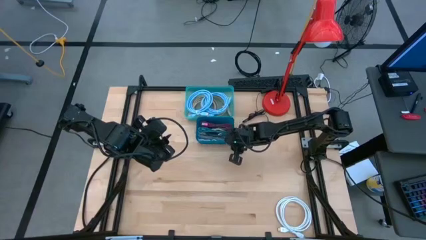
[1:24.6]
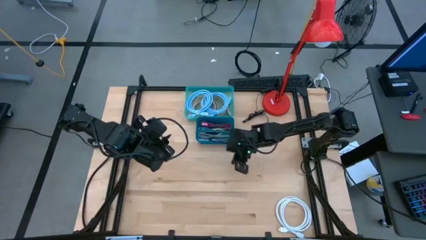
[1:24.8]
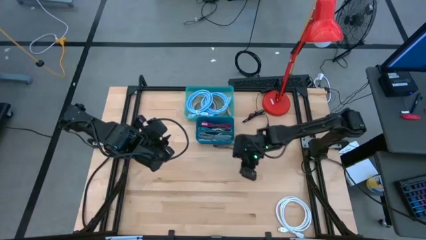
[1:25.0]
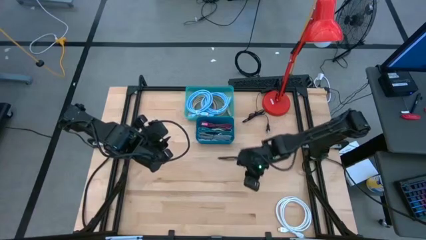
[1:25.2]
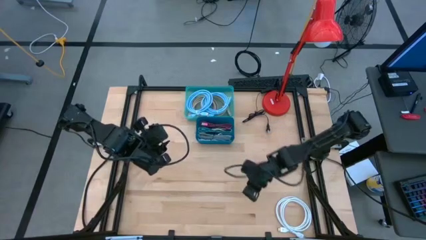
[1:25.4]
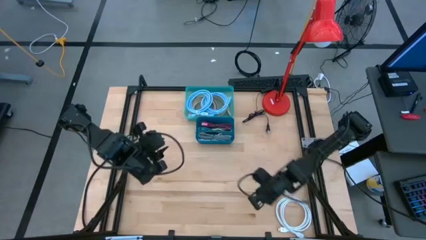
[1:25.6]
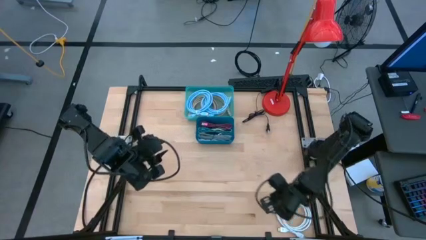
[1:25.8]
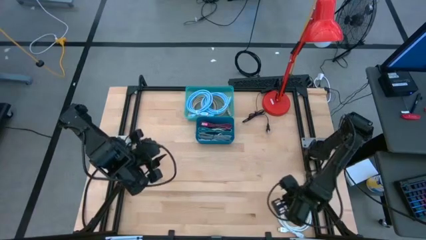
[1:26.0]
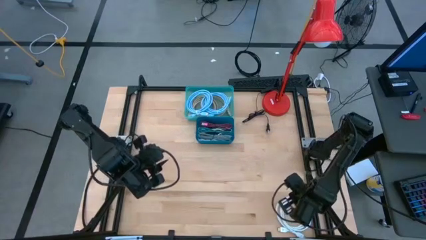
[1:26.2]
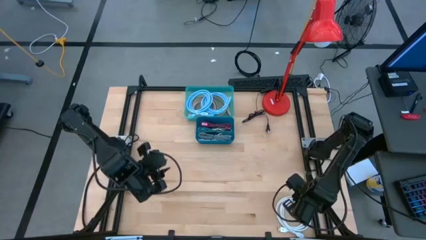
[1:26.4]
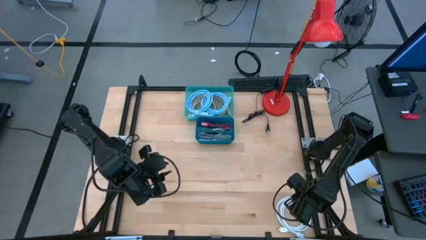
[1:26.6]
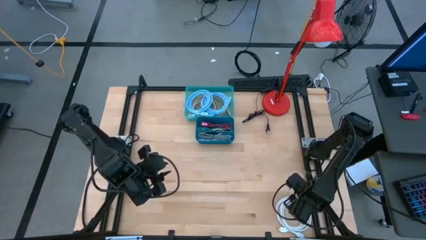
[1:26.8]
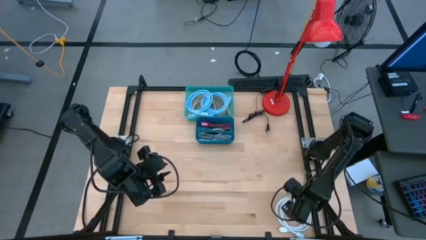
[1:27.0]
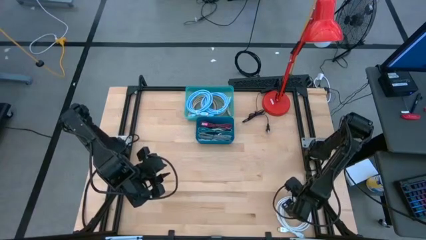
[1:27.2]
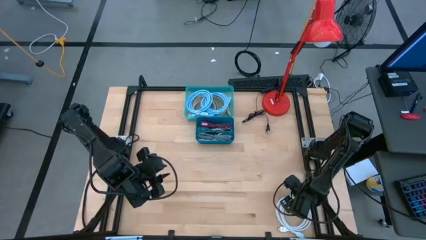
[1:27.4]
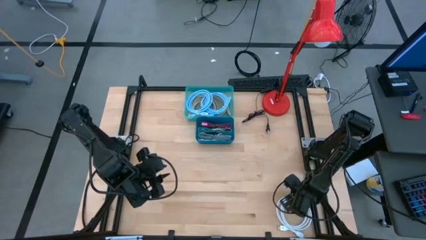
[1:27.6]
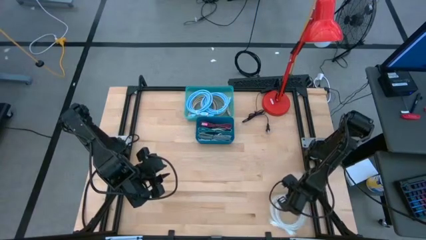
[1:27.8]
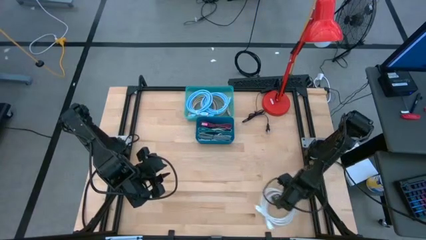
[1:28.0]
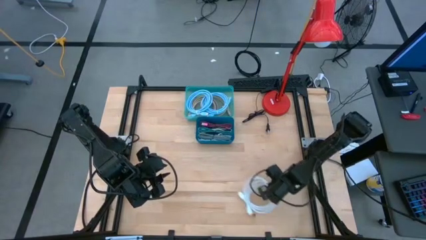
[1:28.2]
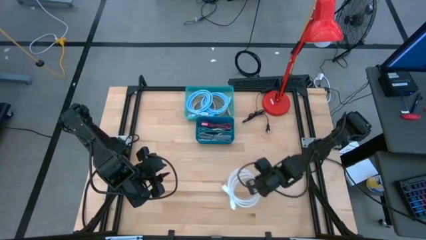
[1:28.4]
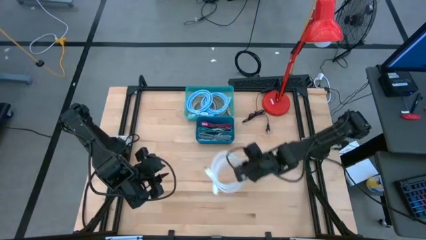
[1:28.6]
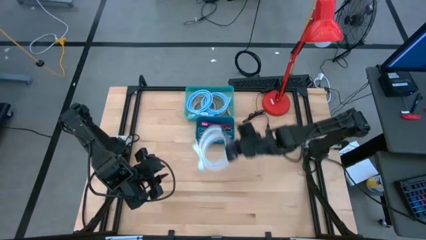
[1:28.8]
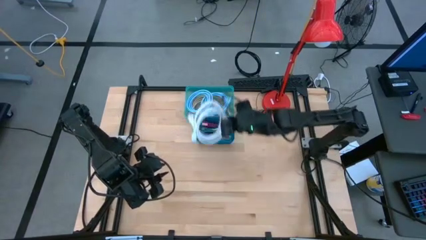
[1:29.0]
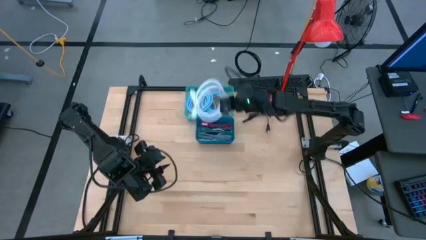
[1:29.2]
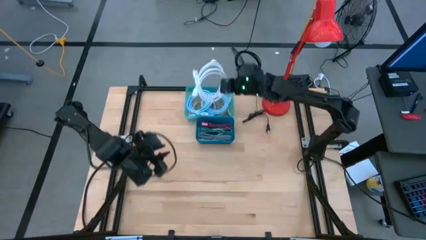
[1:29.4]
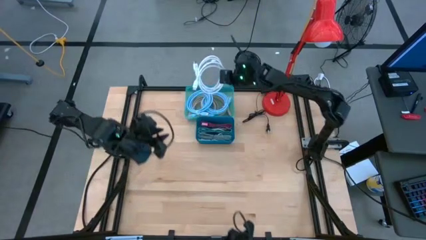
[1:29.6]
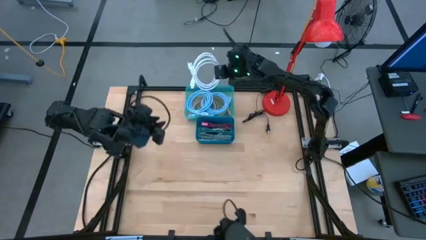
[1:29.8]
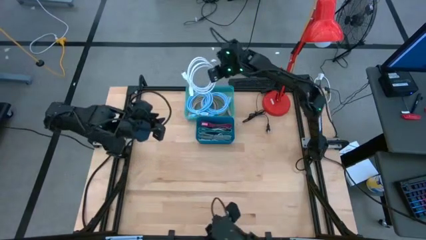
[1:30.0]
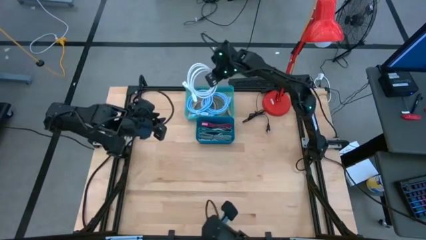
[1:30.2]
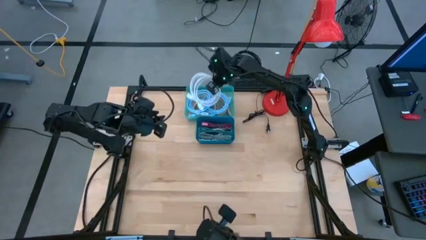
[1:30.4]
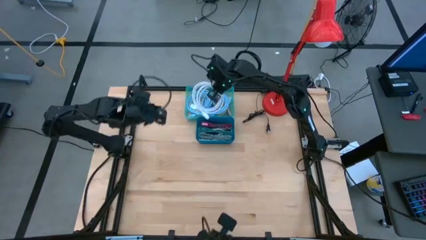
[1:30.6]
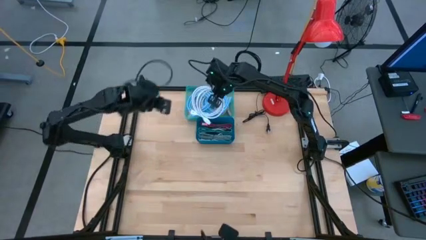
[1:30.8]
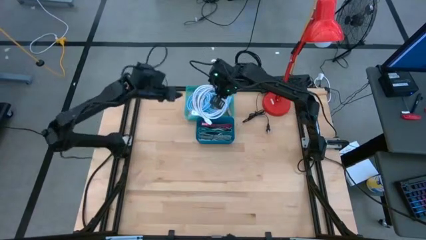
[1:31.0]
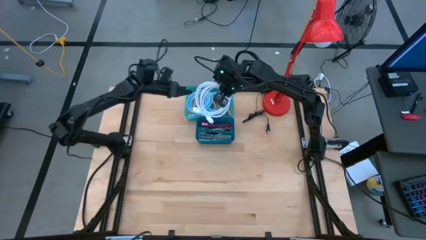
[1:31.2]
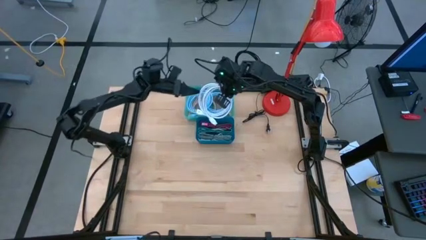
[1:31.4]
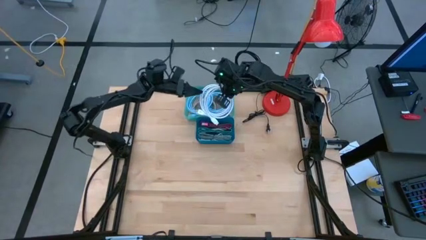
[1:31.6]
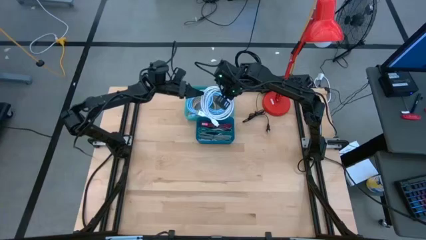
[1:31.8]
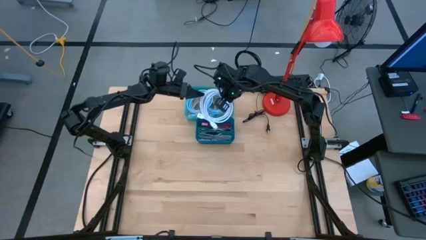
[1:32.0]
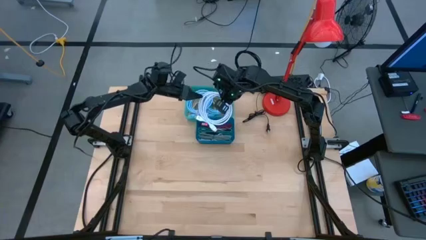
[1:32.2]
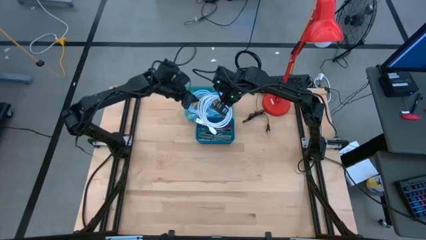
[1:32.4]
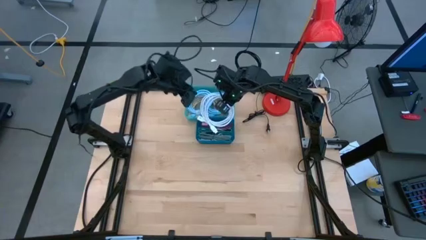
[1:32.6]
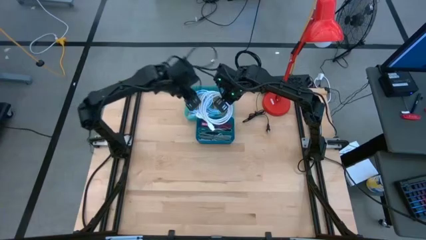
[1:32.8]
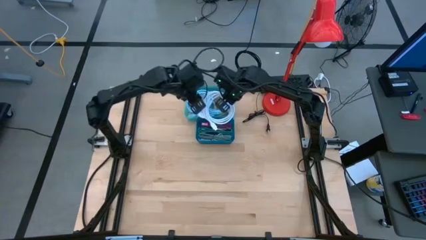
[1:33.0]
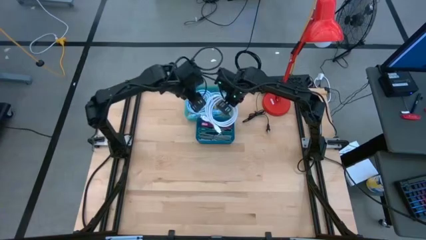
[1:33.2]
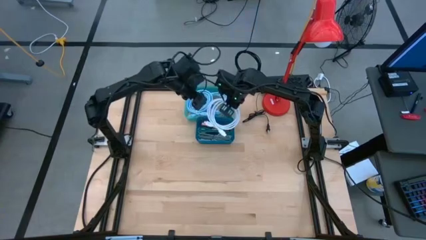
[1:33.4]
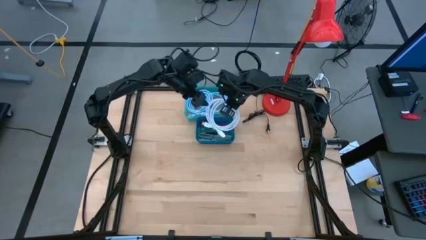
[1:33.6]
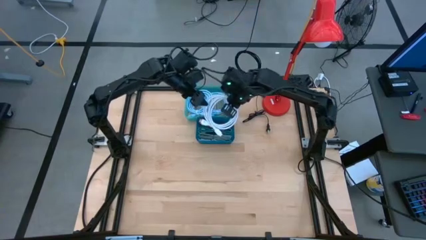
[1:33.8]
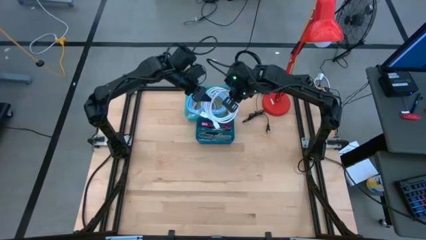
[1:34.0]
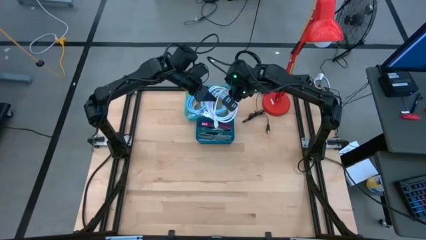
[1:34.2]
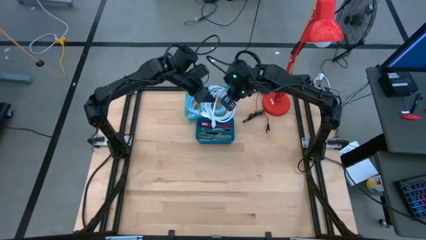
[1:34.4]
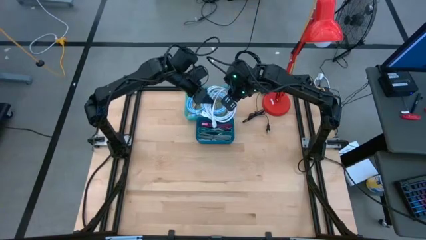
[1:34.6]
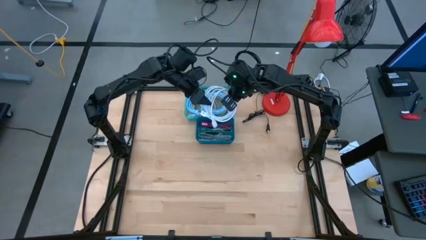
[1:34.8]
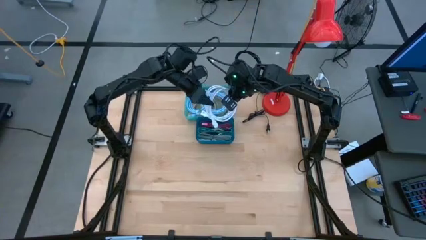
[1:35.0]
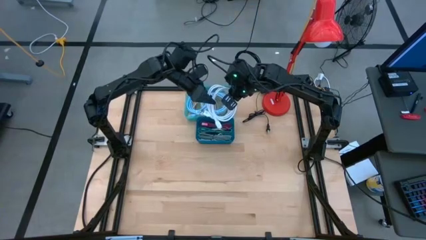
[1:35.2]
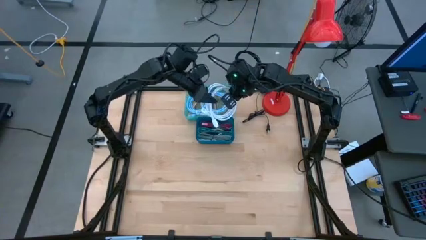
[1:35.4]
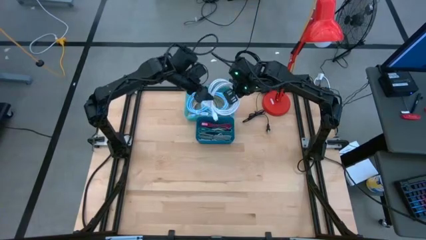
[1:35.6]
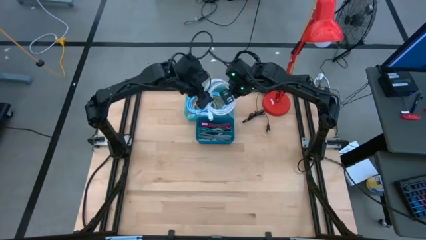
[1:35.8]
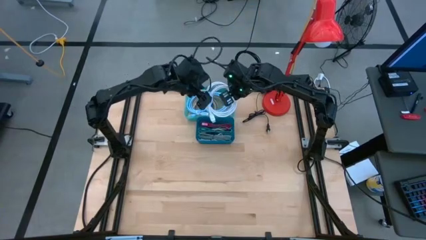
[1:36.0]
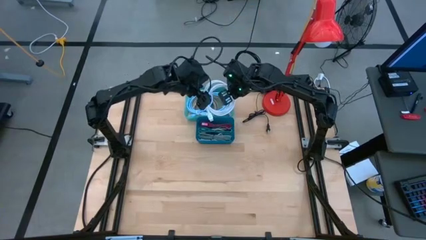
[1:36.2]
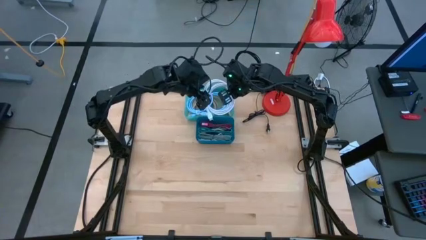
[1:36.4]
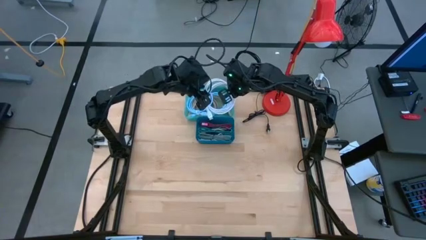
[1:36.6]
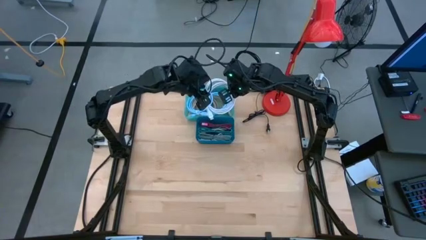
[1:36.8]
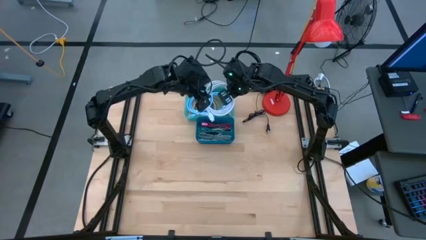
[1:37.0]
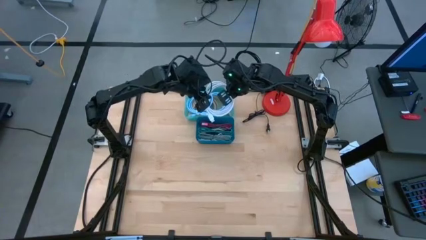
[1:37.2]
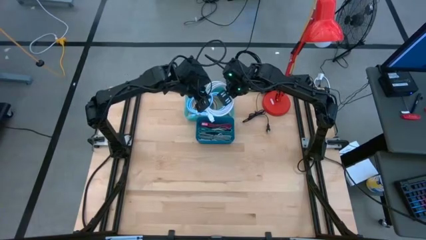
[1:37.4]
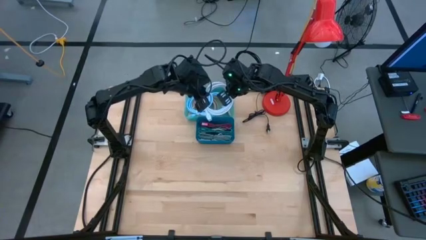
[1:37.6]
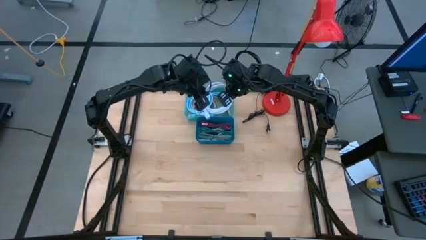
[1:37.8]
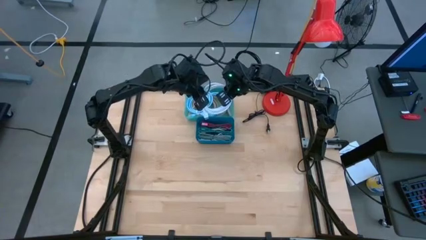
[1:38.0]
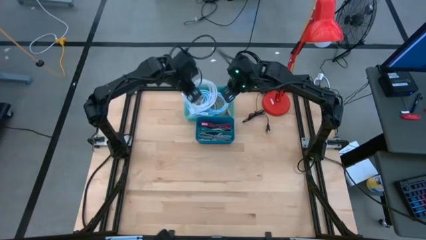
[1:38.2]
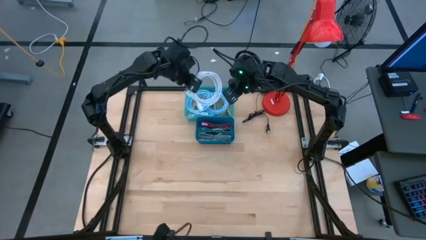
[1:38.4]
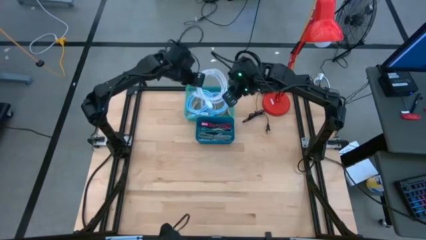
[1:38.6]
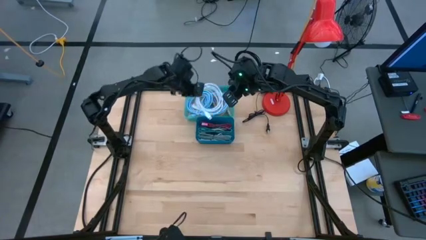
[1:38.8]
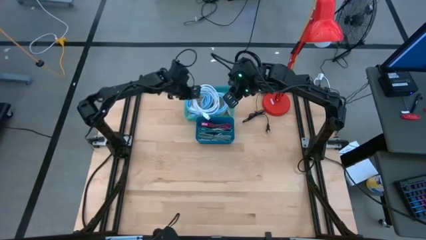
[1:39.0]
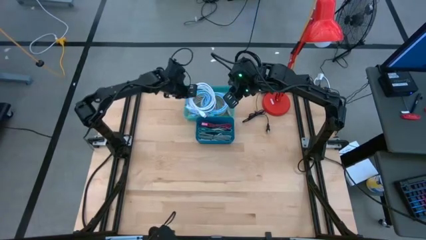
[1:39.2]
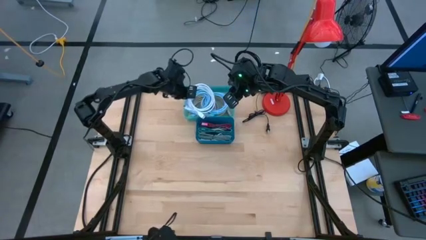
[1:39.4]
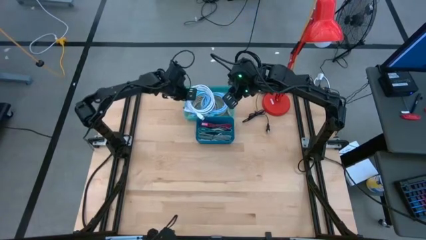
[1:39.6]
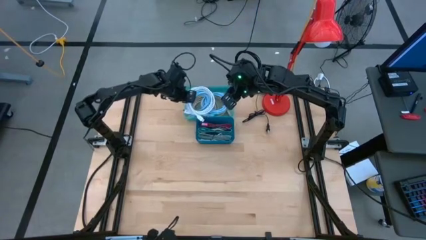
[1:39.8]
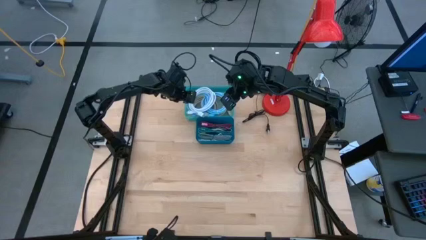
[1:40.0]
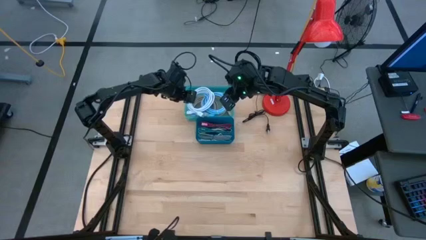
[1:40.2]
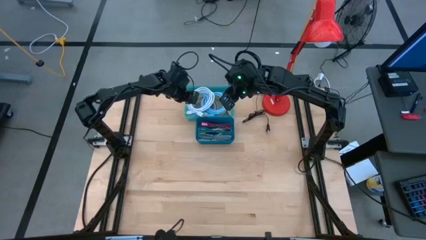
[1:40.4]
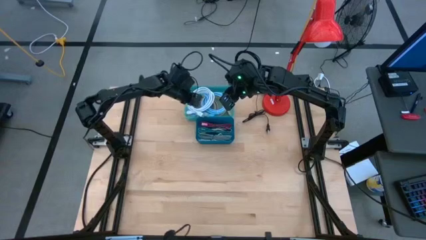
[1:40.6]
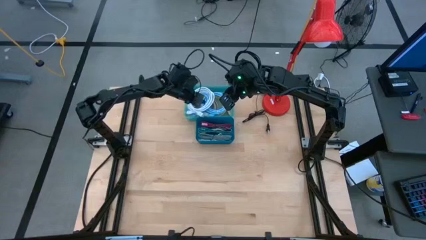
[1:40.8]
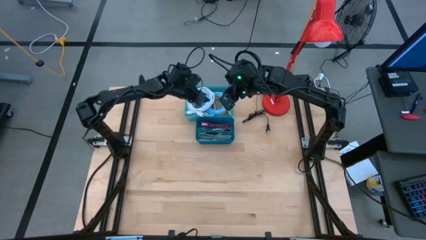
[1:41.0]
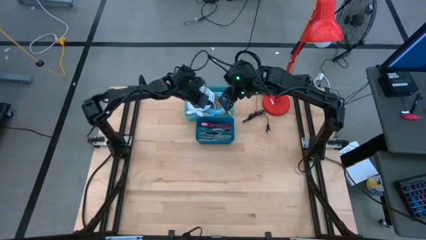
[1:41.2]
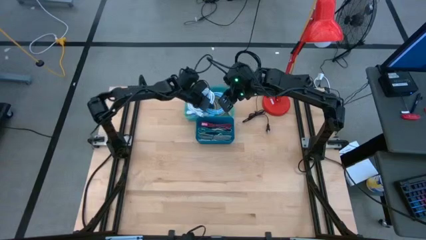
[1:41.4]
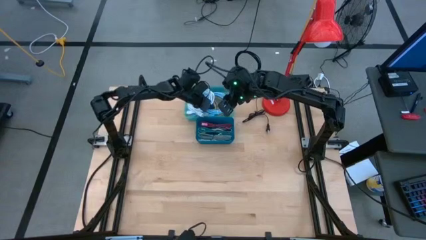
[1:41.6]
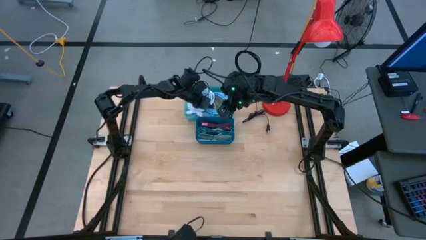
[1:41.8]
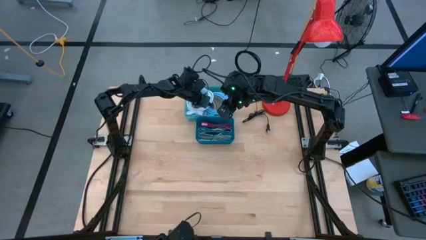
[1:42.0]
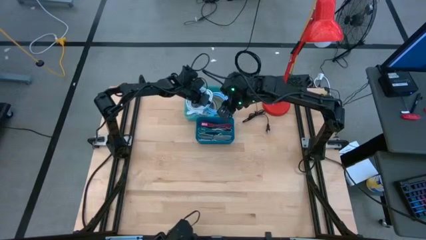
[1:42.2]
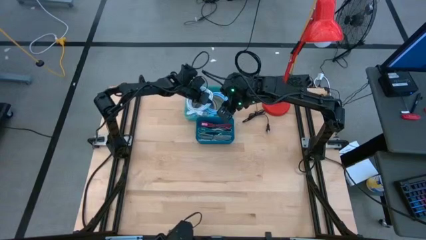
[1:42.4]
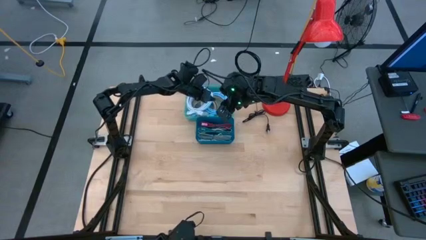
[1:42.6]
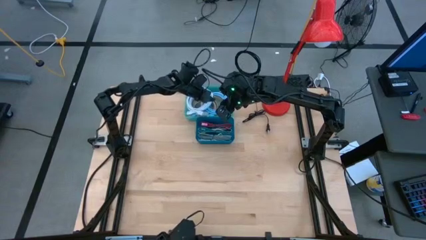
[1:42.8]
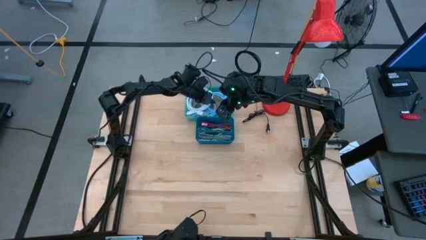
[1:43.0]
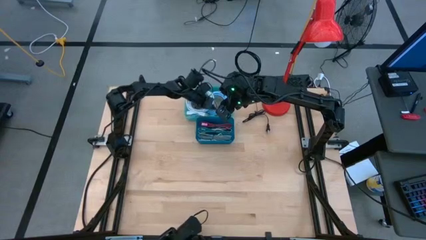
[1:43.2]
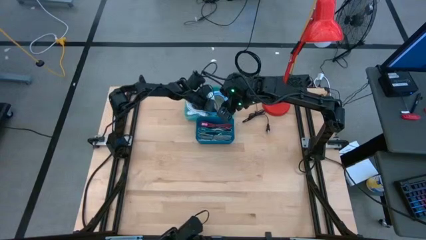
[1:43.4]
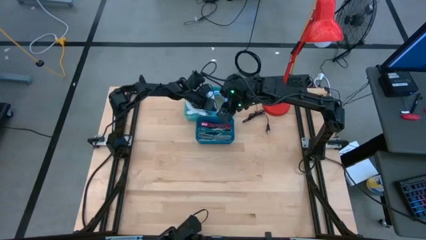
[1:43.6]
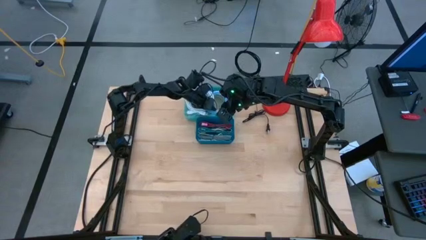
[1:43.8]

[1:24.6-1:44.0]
Task: Pick & Place USB Port
Put the white display cable into the green bin
